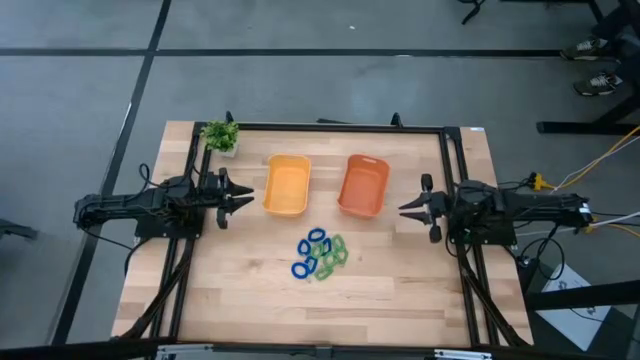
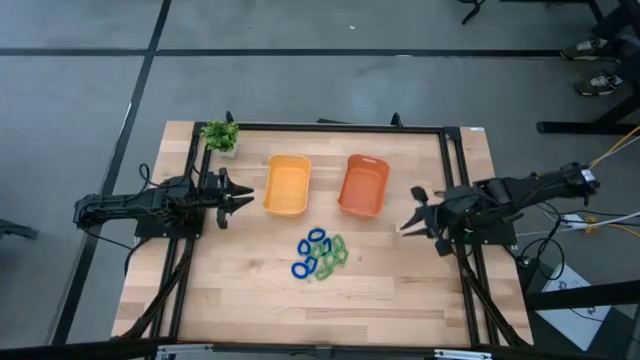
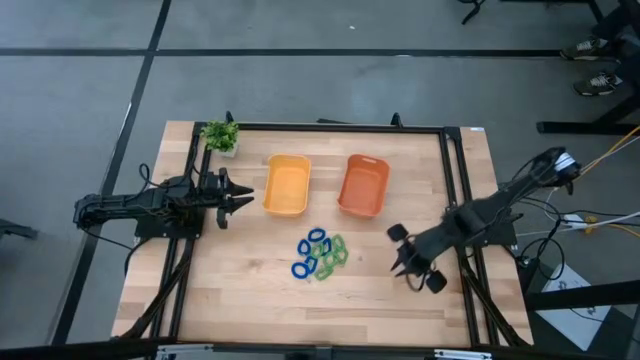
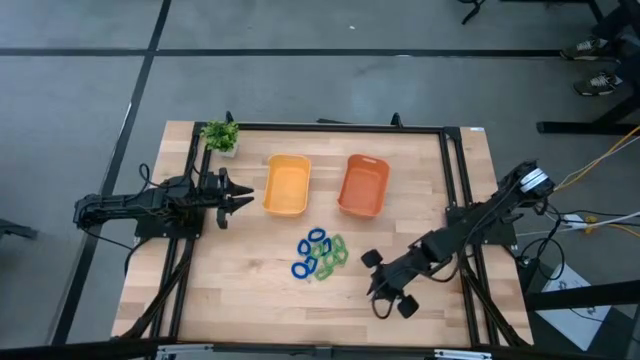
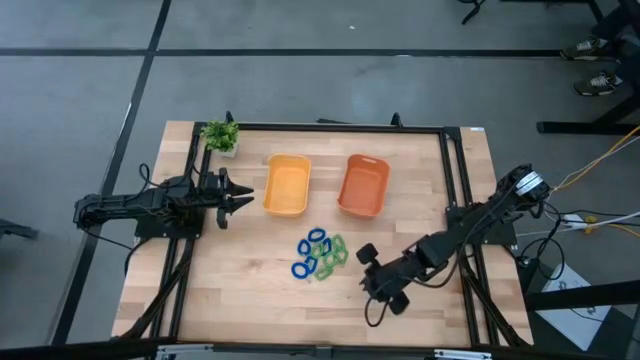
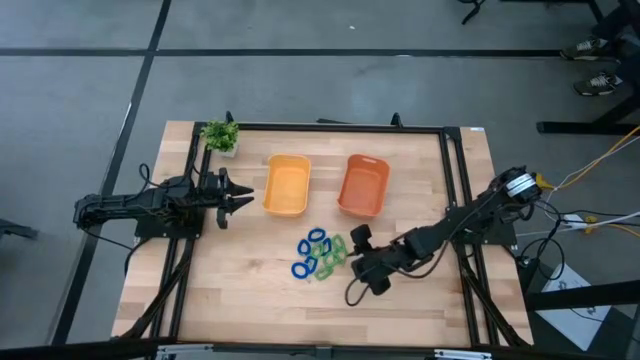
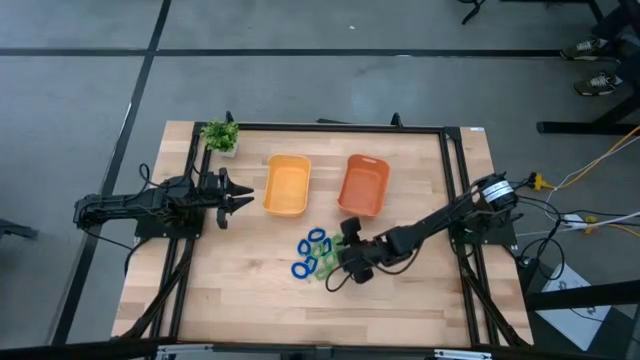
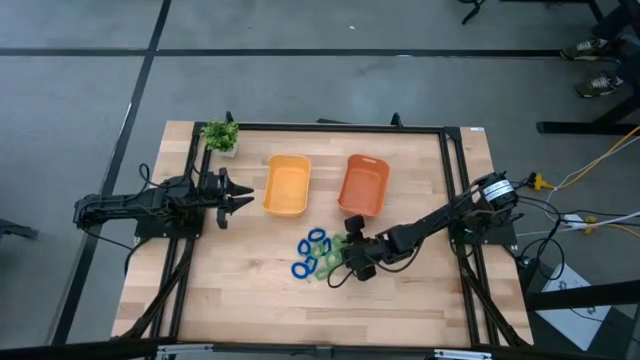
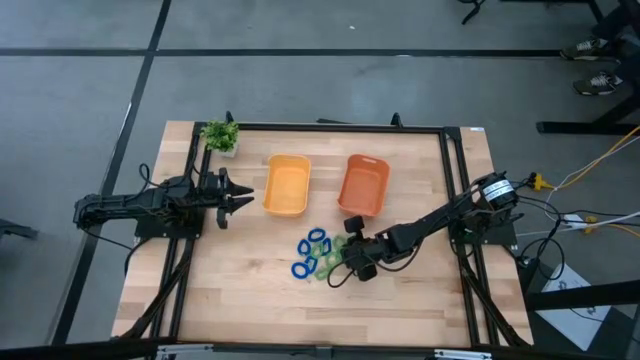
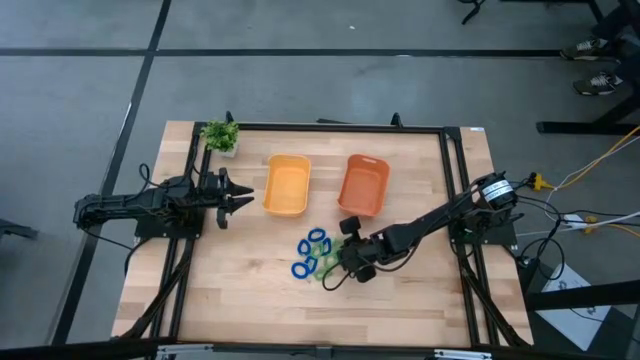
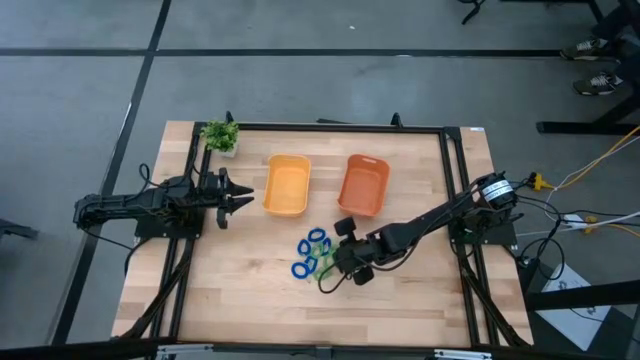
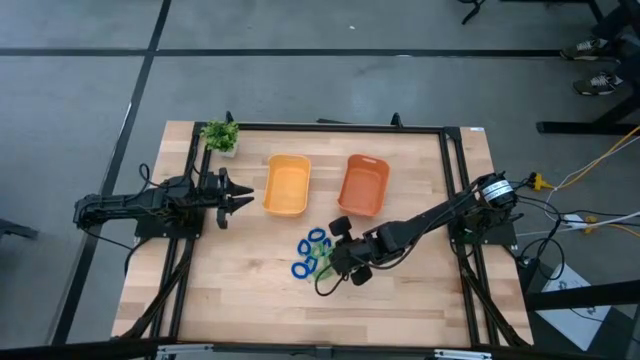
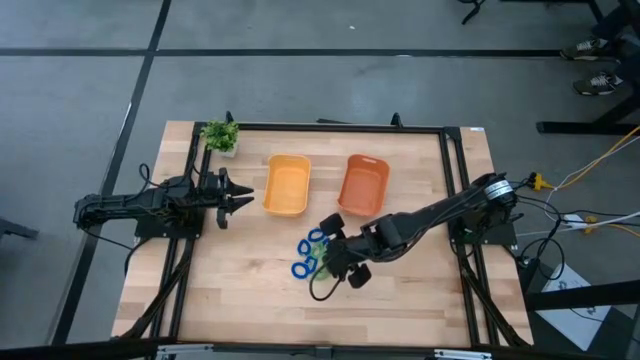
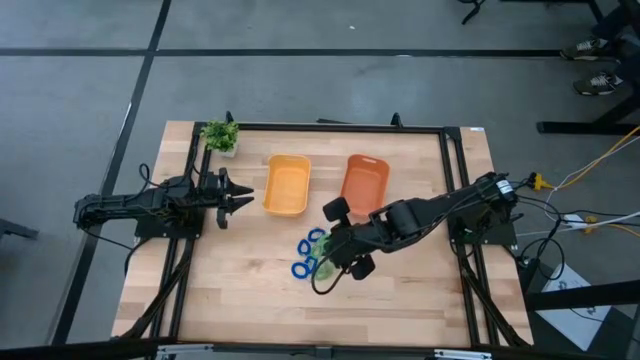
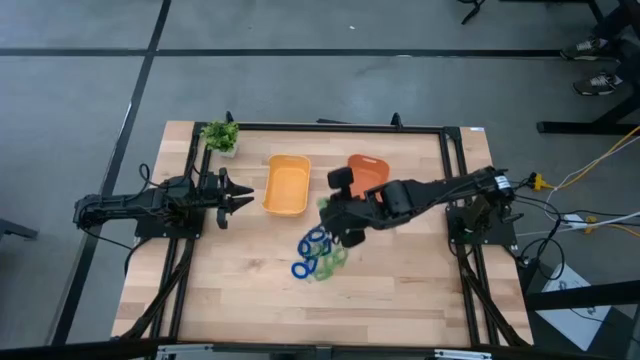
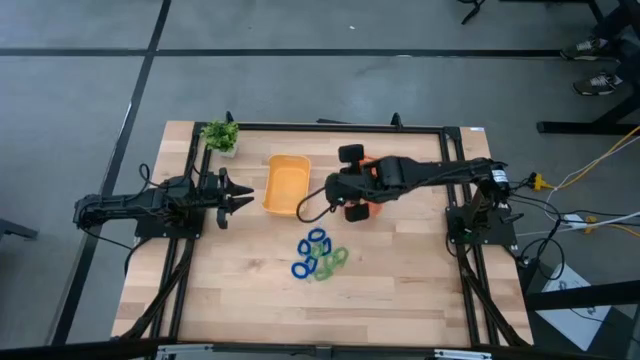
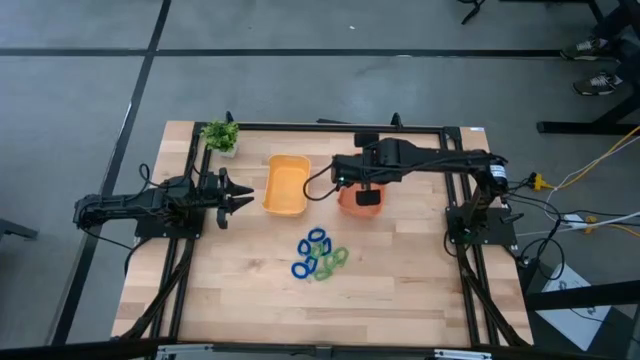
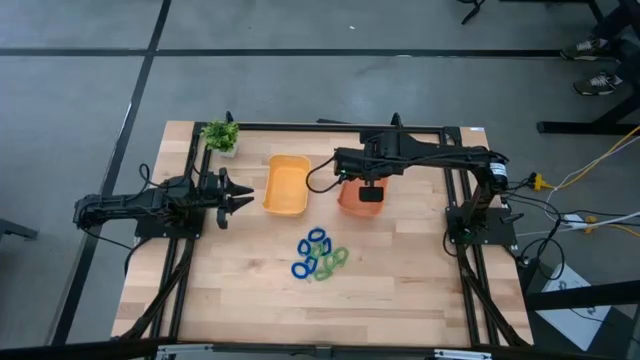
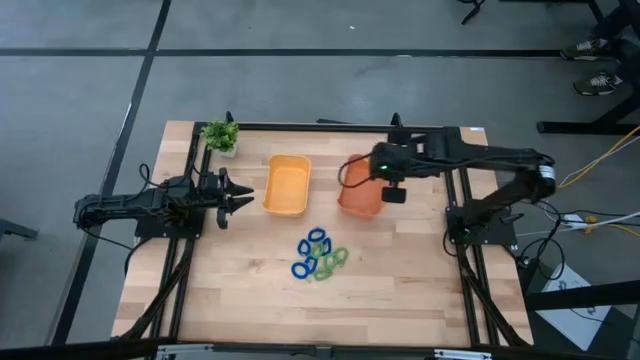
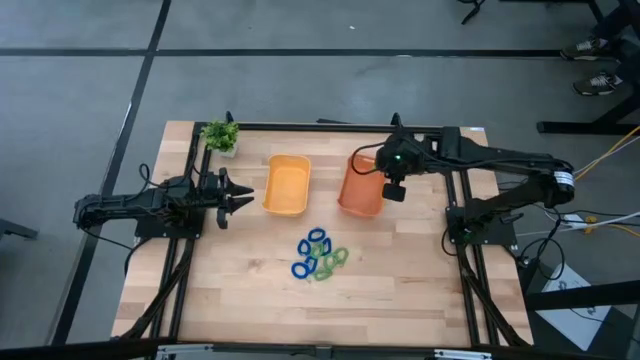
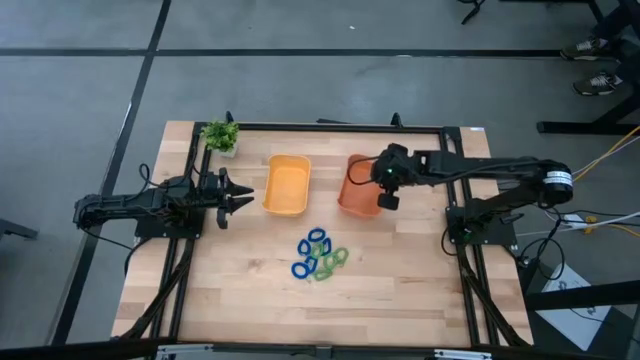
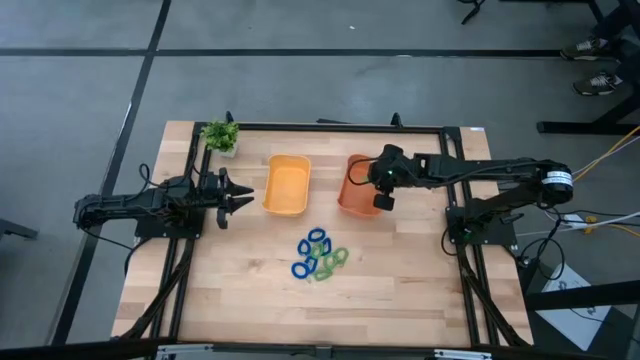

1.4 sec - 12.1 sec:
Task: Sort spring keychains
Put the green spring keychain into the orange bin

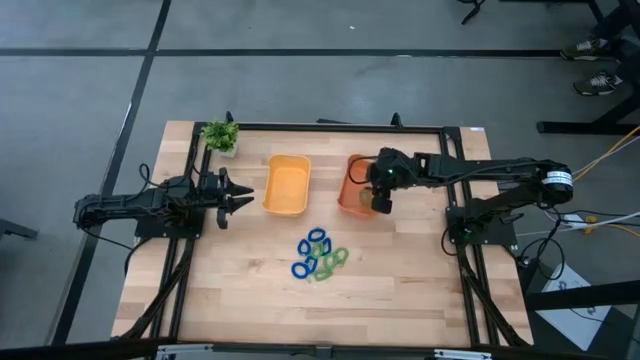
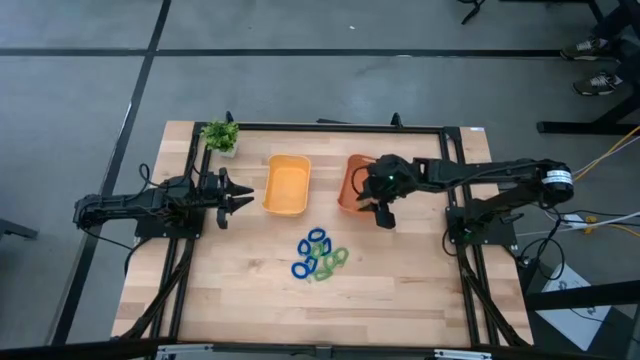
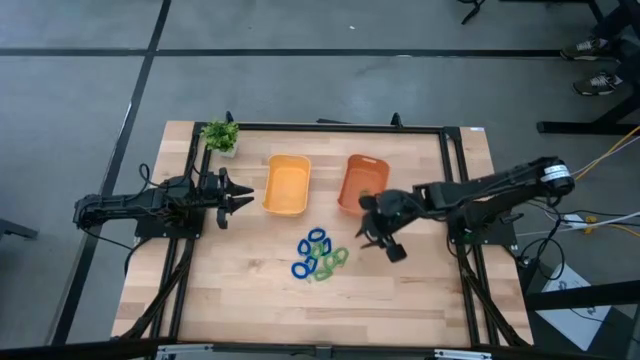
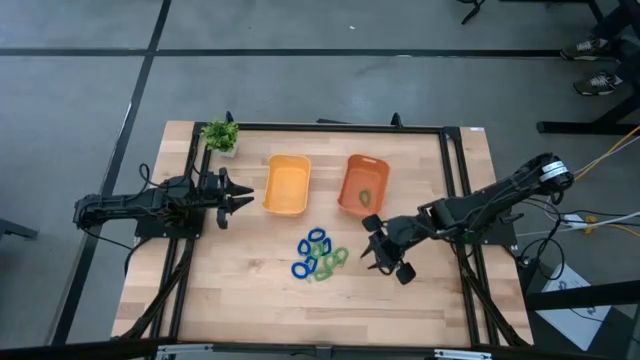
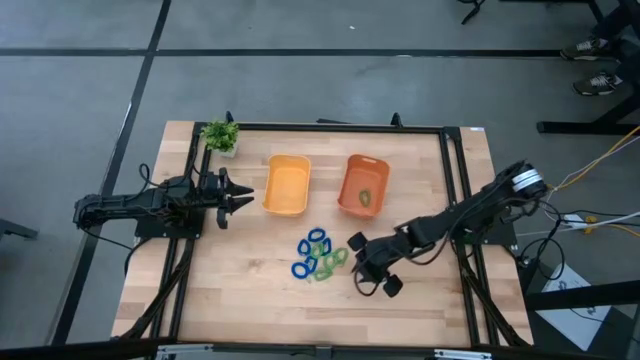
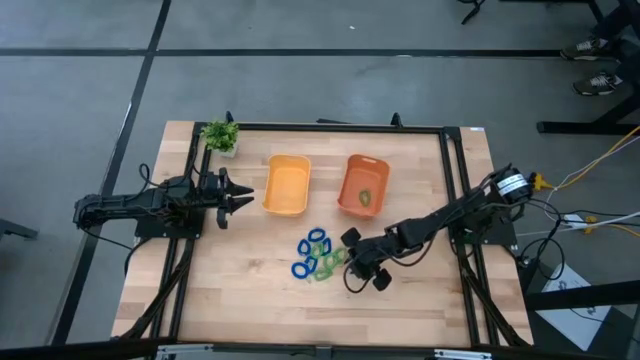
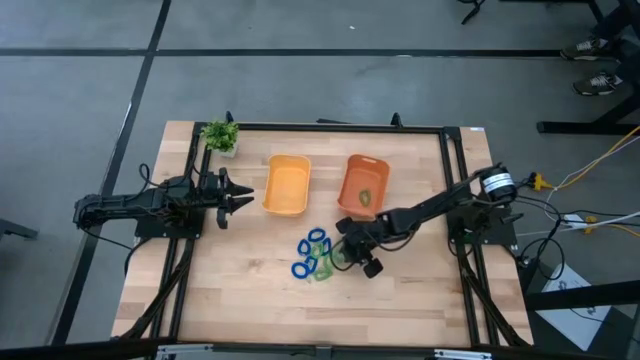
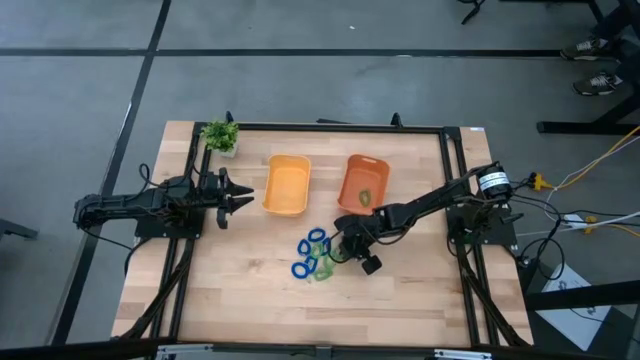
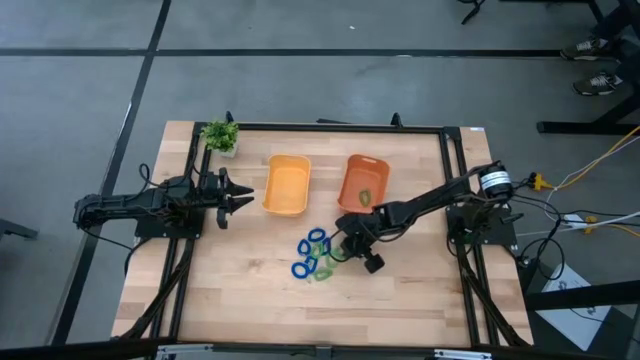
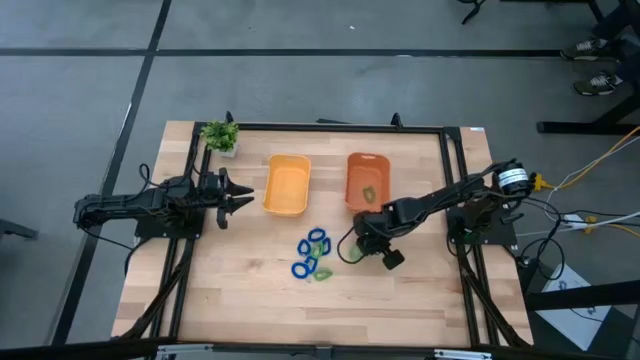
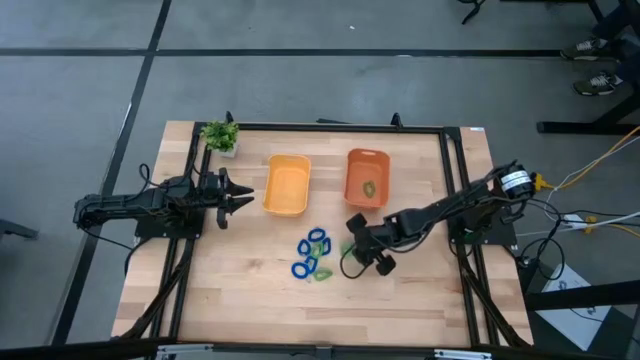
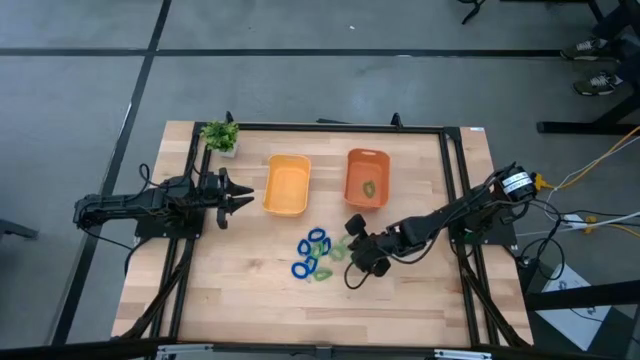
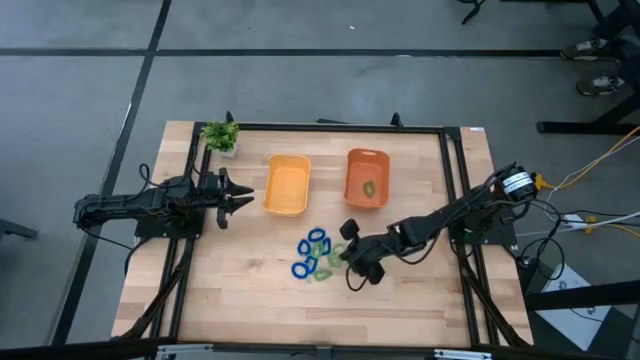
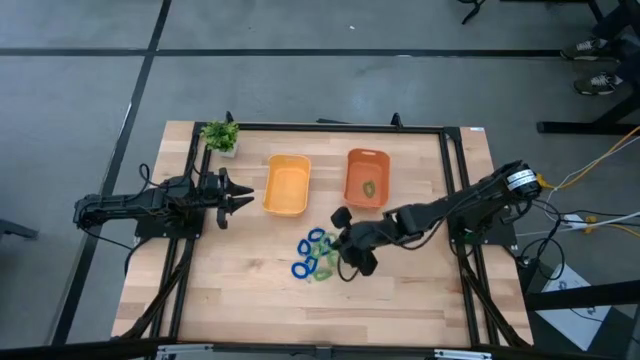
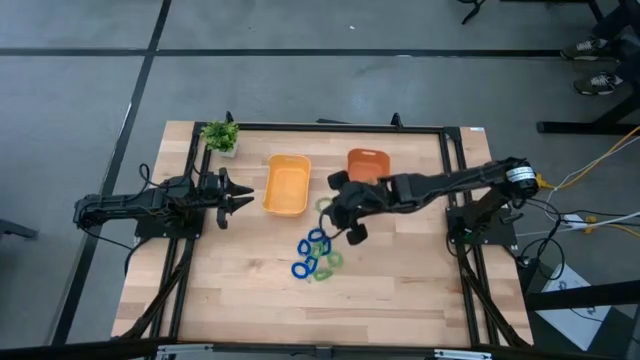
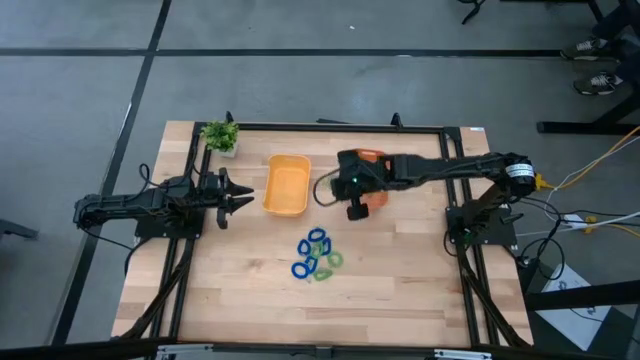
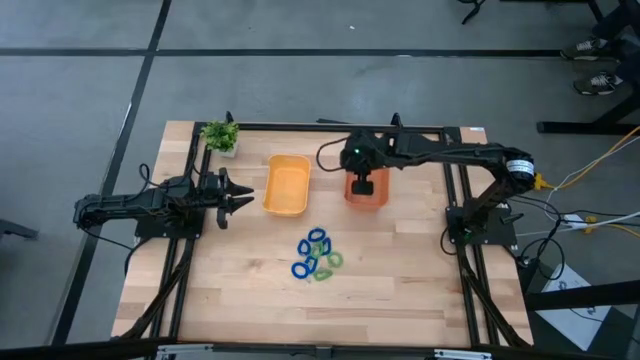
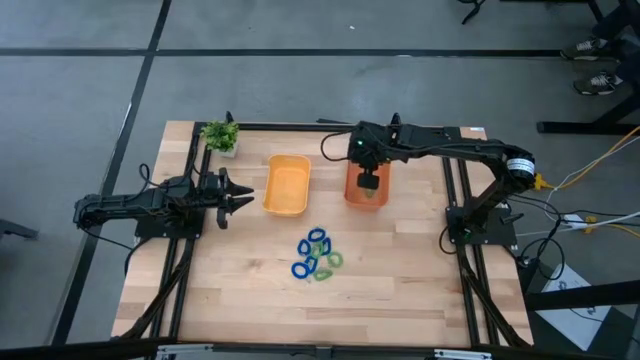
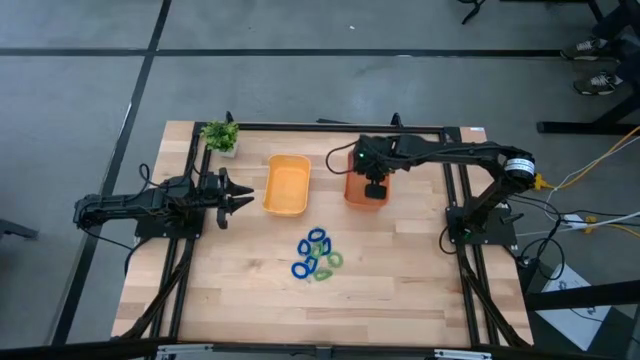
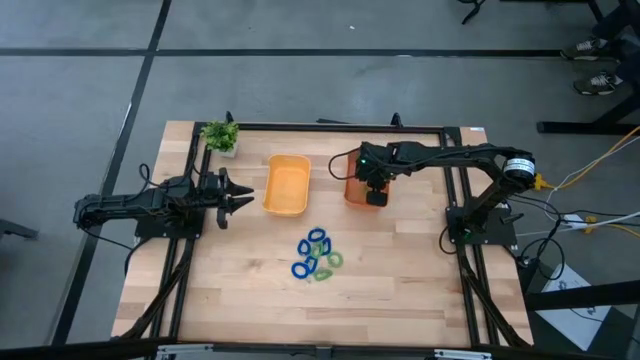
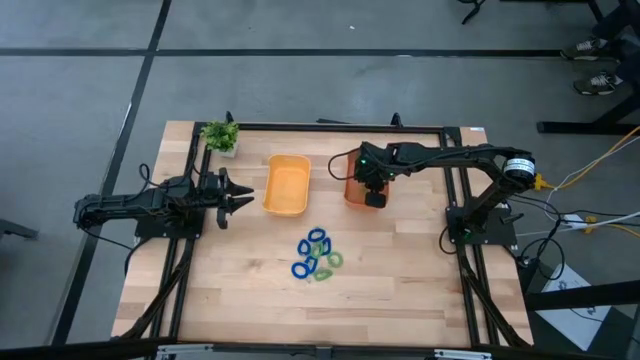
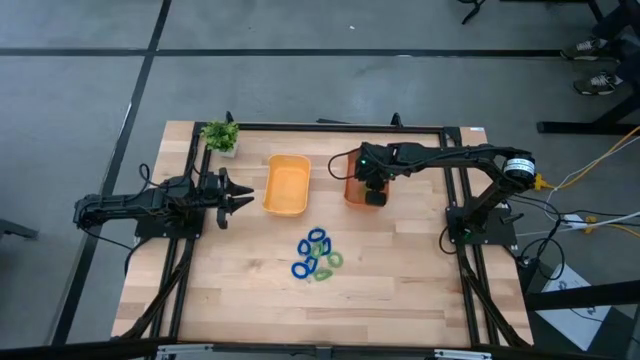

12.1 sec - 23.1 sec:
Put the green spring keychain into the orange bin
